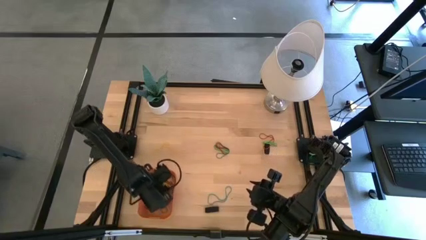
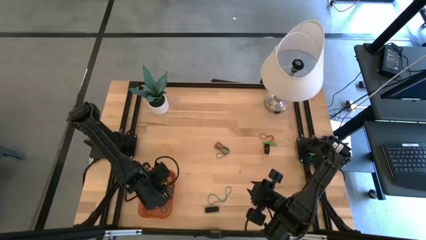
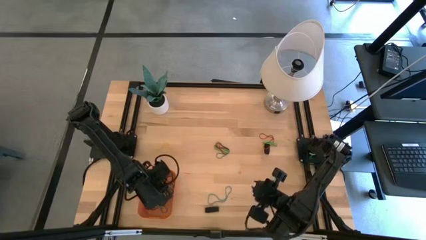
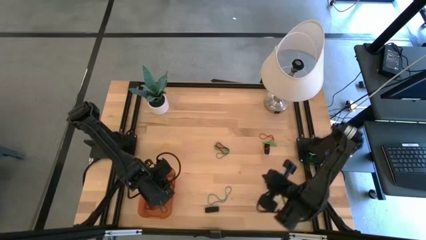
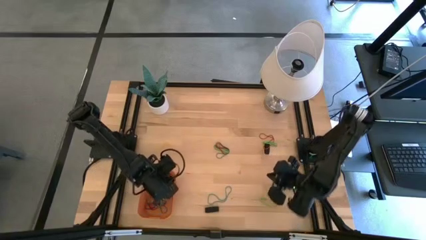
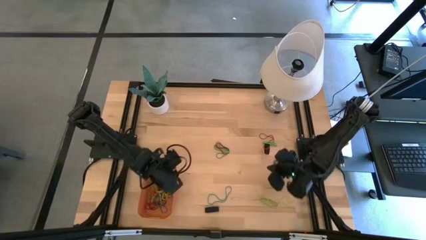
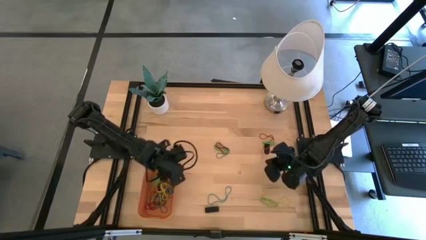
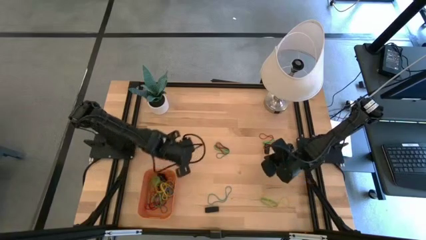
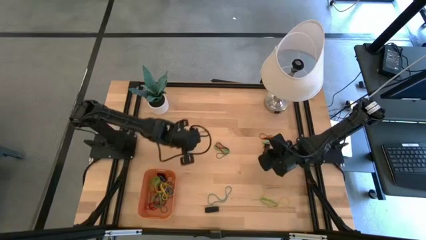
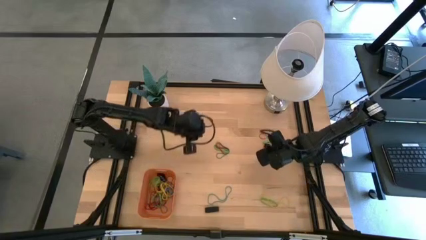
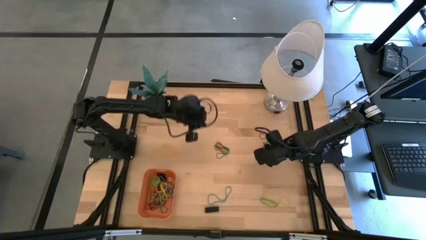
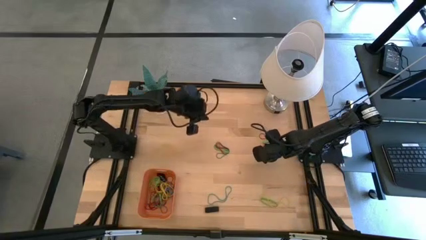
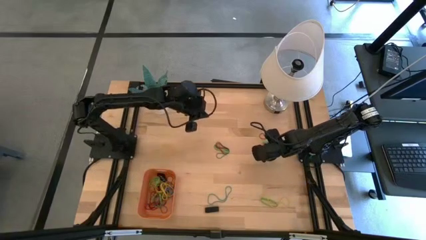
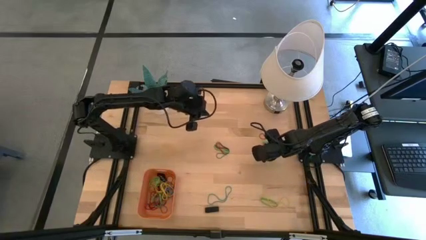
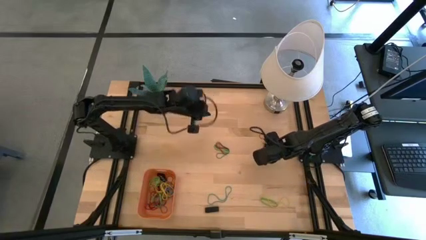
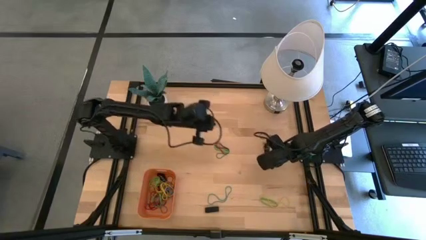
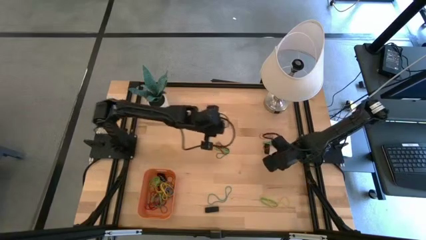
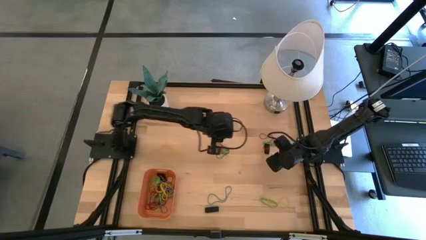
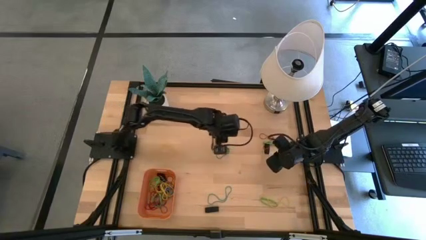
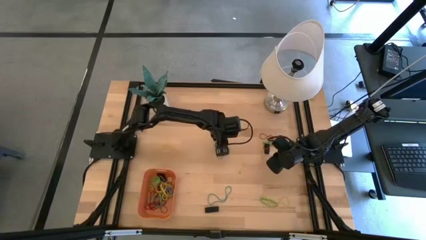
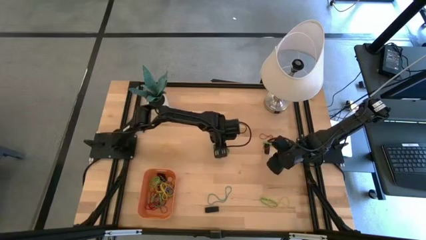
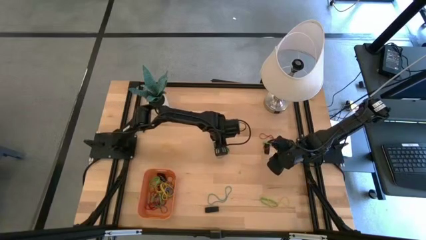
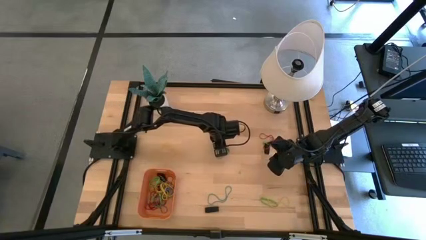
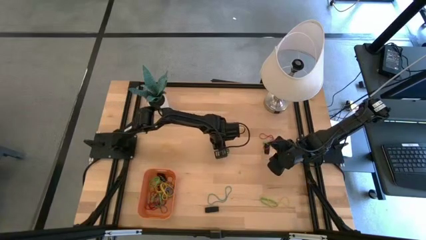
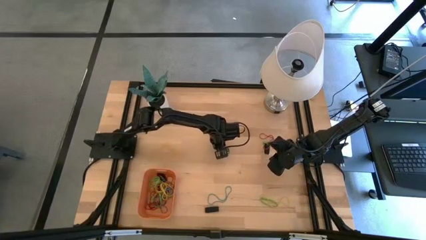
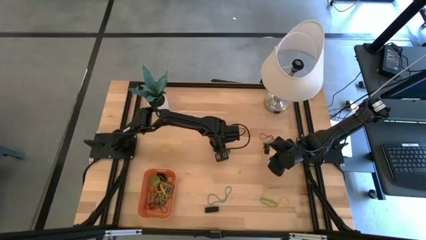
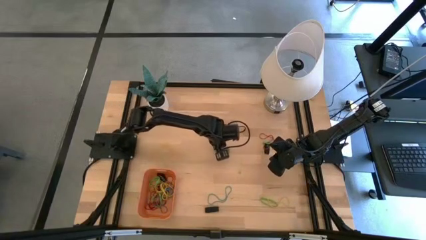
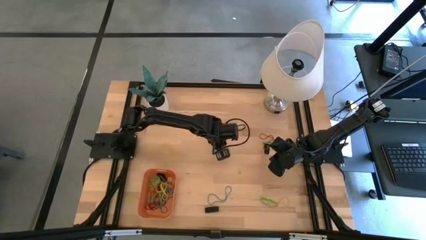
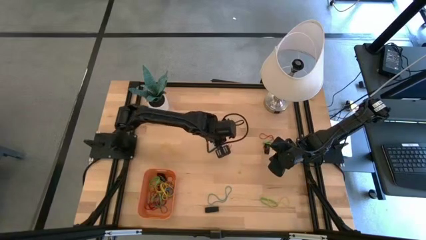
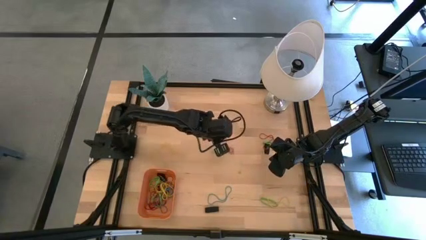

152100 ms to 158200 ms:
Task: Pick and place rubber bands into bin
Put the blue rubber band into the orange bin

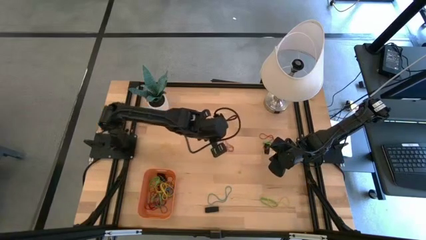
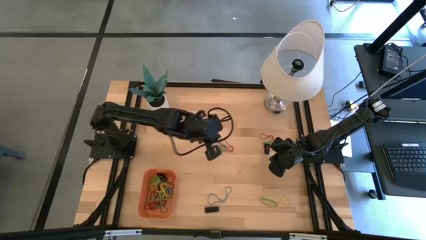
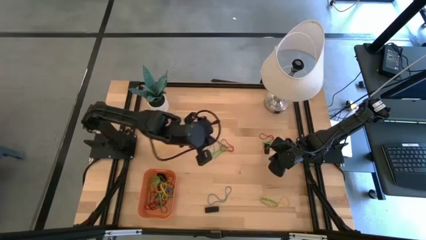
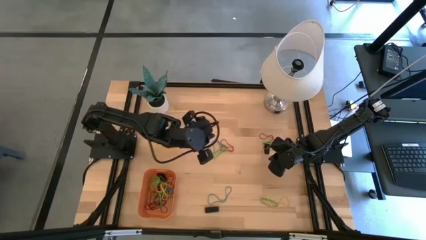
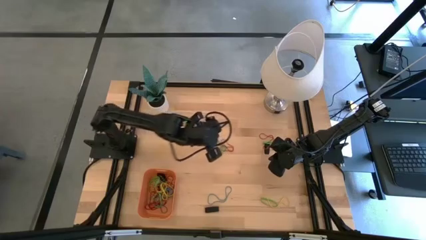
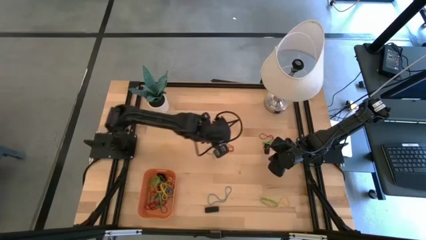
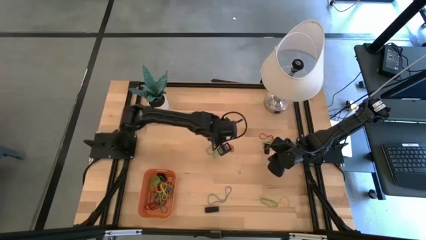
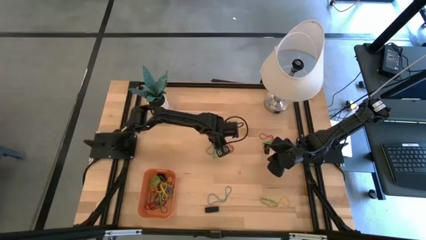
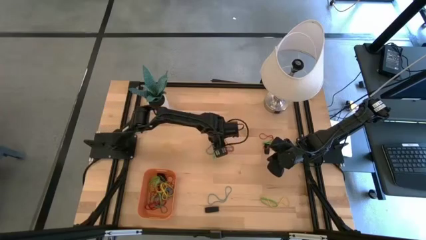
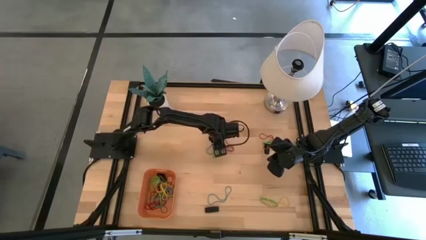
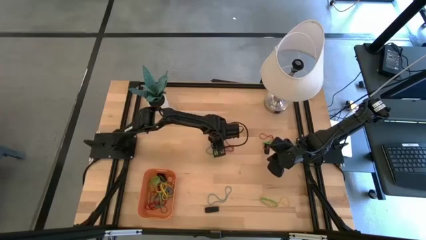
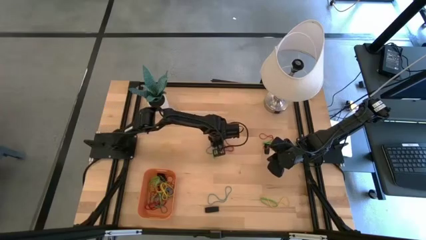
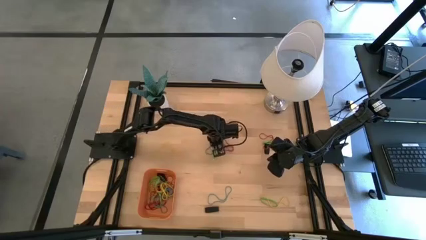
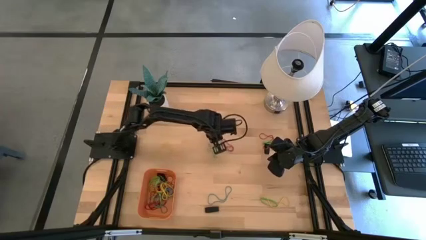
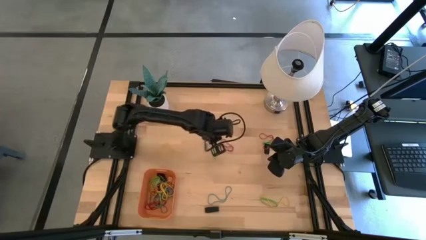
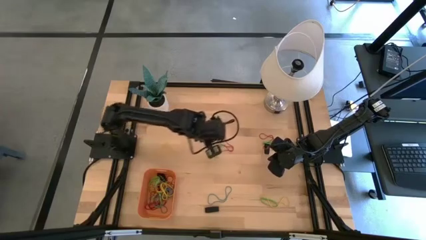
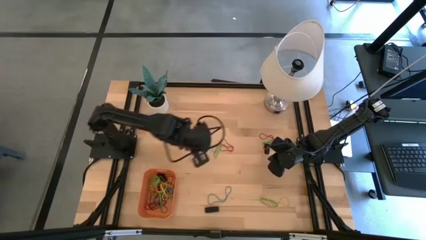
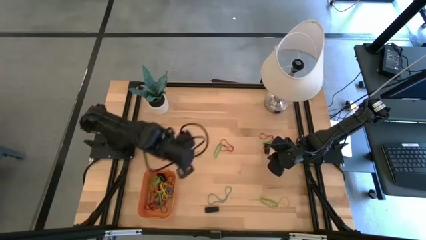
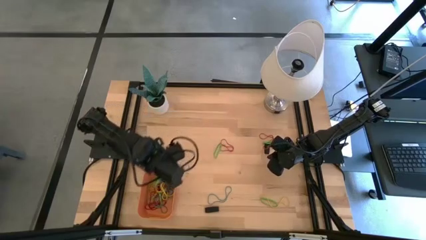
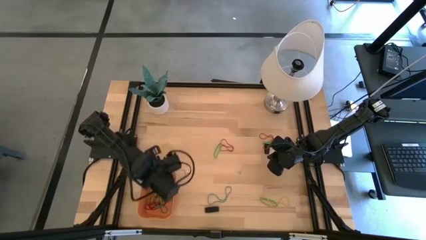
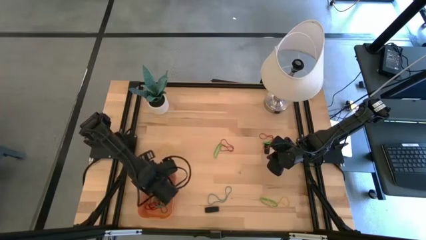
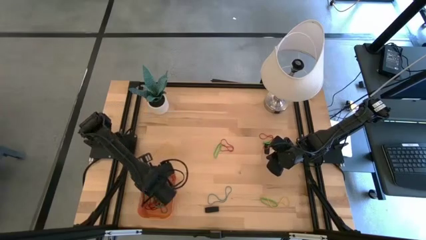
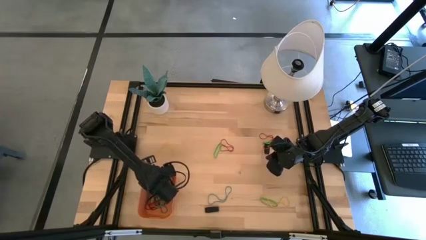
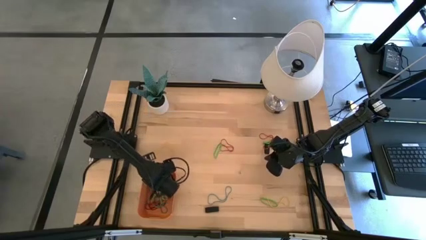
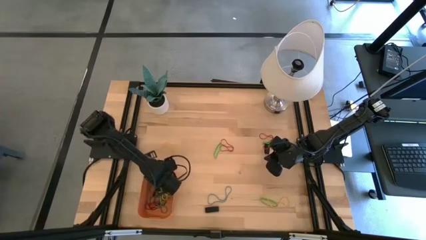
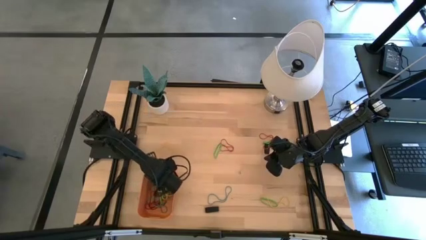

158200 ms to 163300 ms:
Put the blue rubber band into the orange bin
